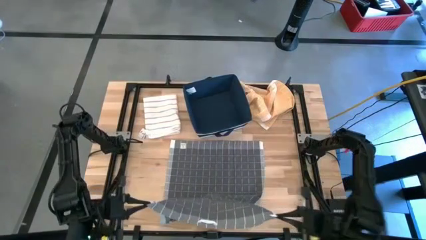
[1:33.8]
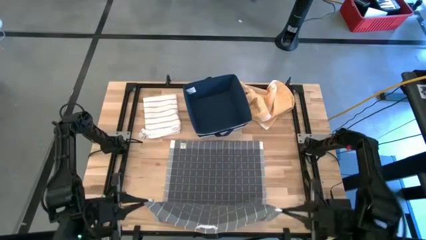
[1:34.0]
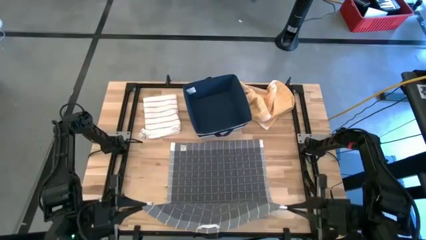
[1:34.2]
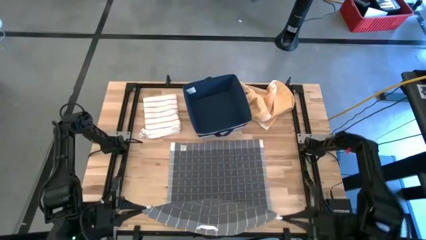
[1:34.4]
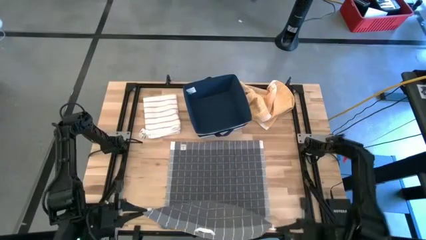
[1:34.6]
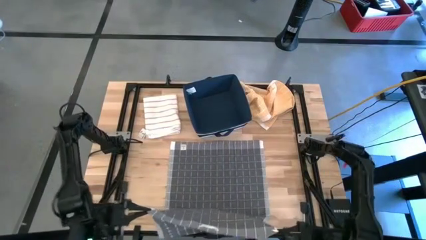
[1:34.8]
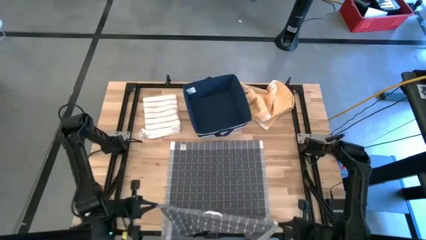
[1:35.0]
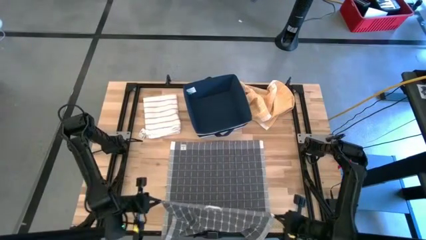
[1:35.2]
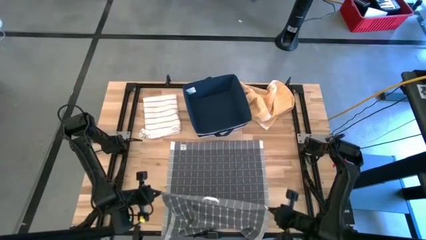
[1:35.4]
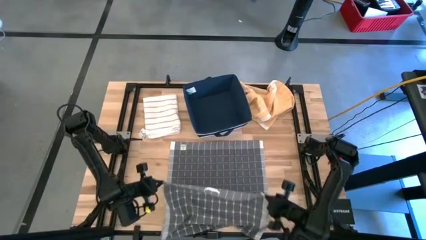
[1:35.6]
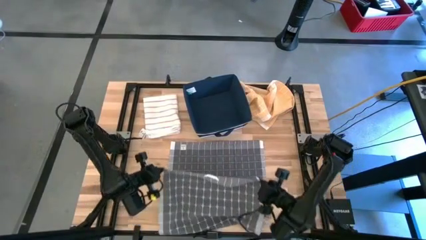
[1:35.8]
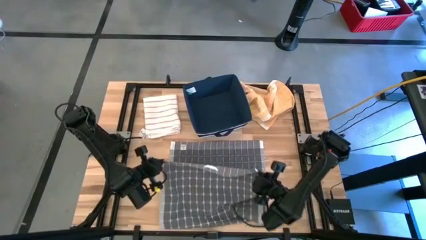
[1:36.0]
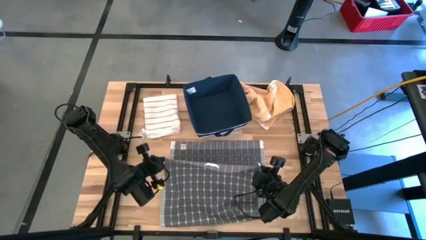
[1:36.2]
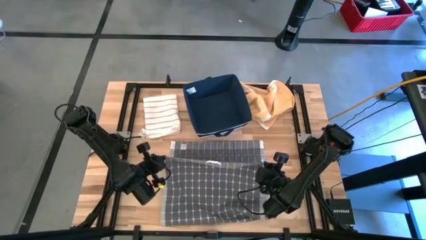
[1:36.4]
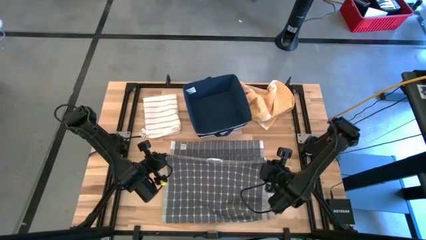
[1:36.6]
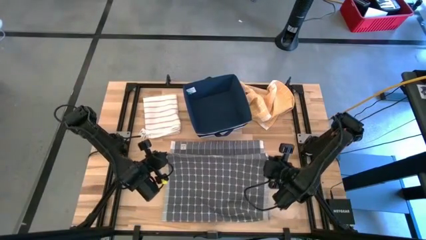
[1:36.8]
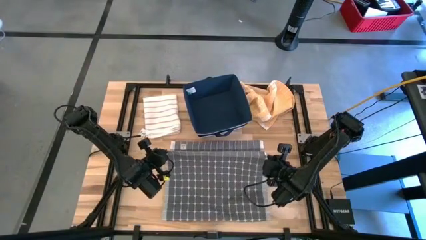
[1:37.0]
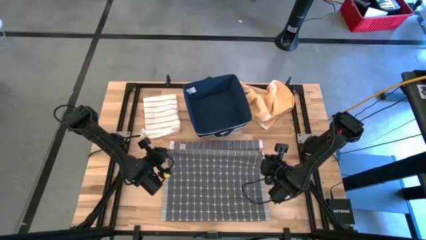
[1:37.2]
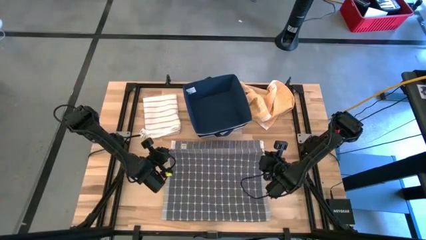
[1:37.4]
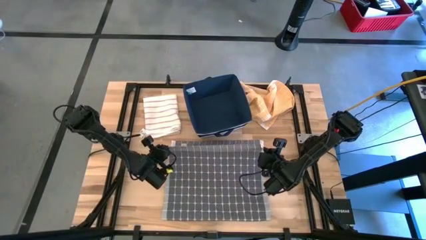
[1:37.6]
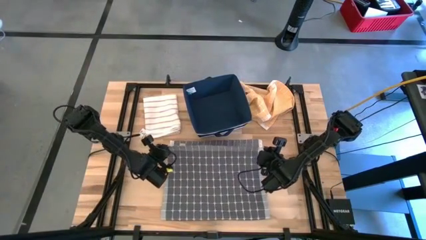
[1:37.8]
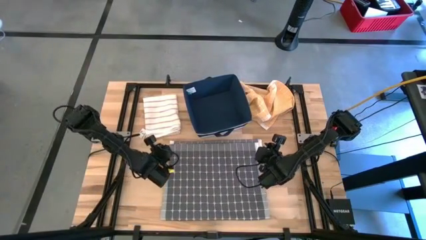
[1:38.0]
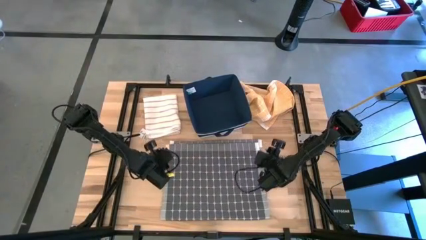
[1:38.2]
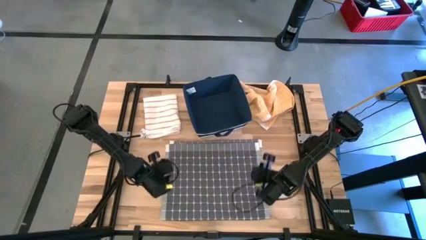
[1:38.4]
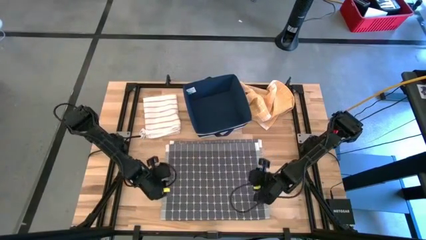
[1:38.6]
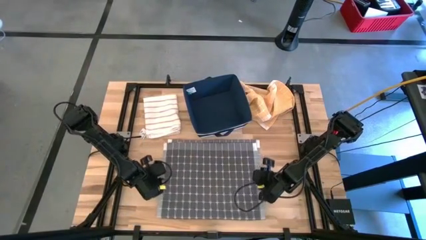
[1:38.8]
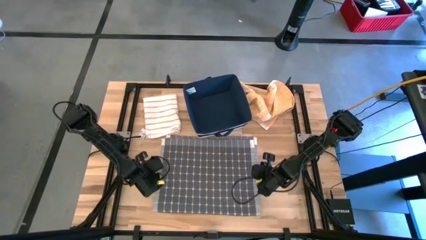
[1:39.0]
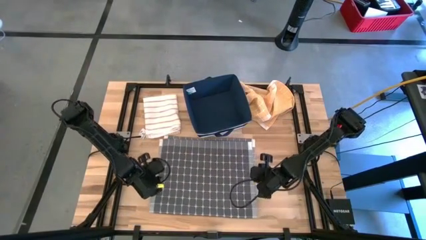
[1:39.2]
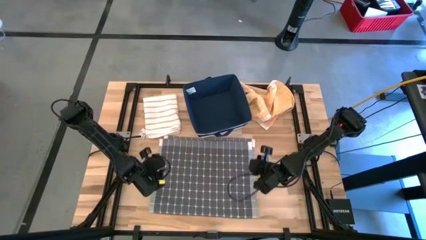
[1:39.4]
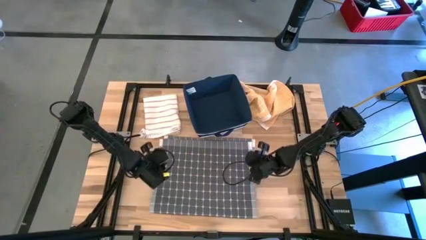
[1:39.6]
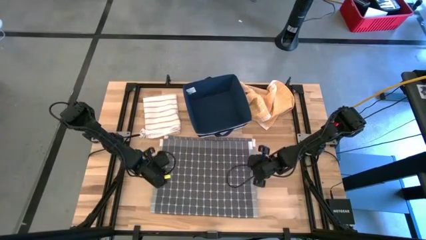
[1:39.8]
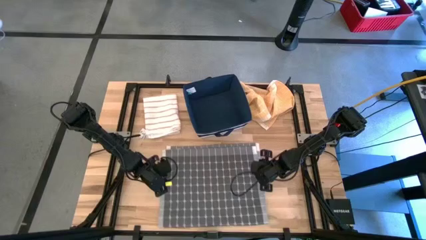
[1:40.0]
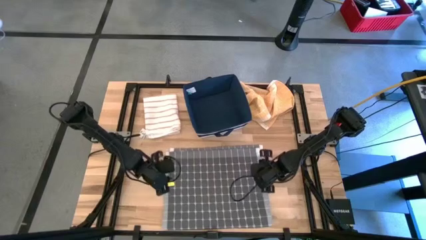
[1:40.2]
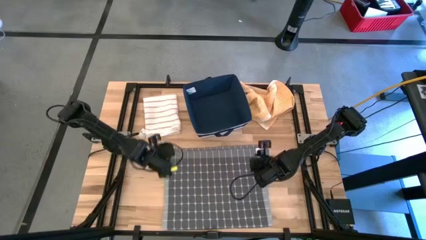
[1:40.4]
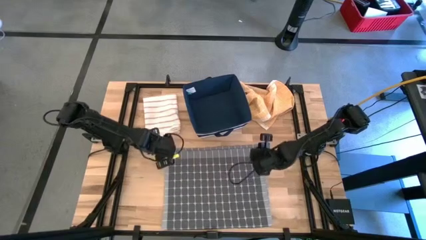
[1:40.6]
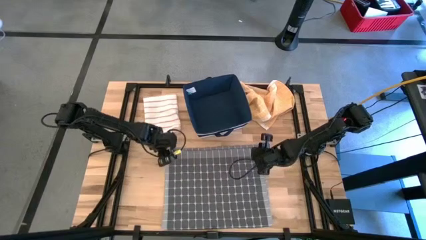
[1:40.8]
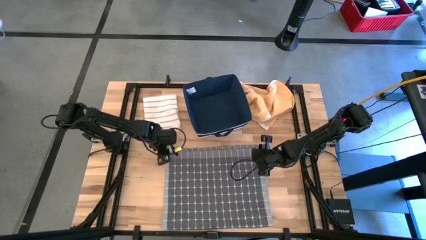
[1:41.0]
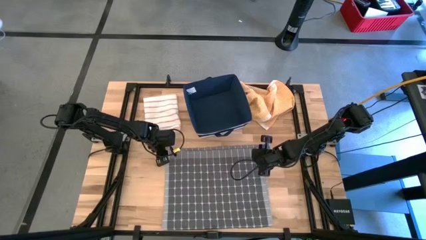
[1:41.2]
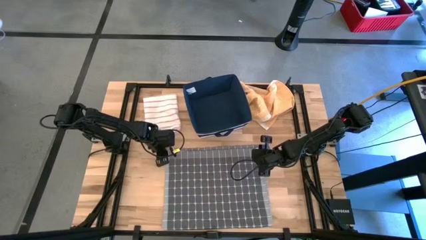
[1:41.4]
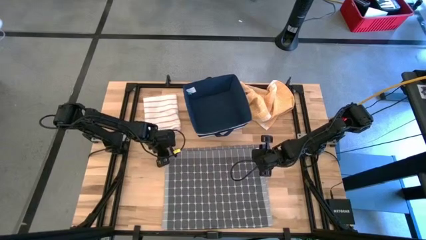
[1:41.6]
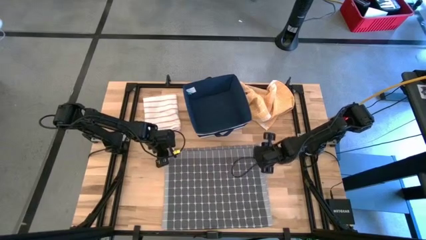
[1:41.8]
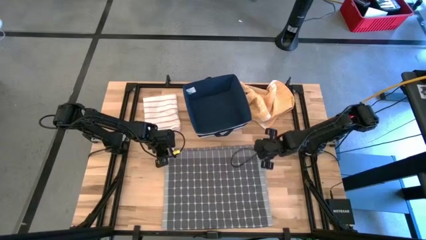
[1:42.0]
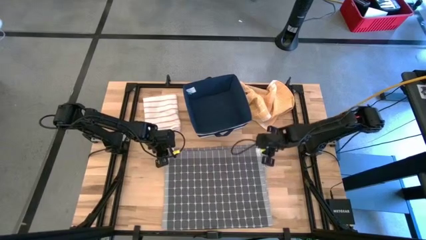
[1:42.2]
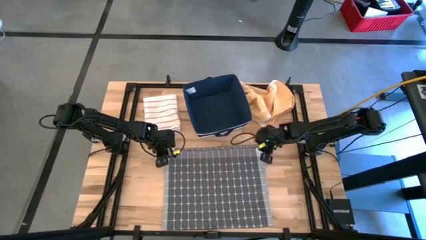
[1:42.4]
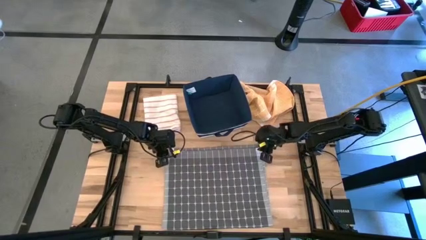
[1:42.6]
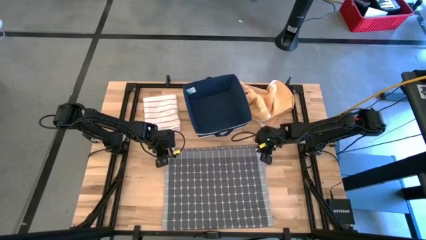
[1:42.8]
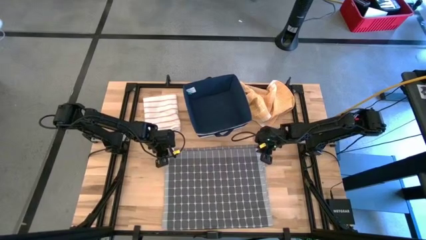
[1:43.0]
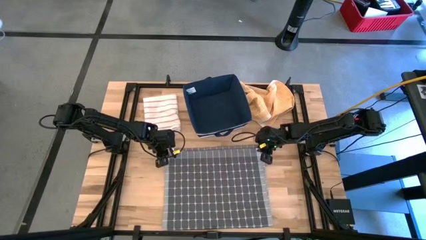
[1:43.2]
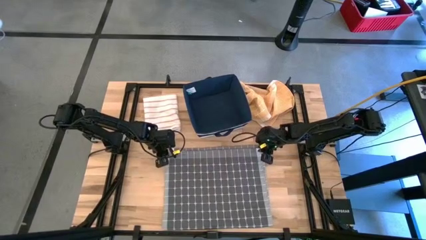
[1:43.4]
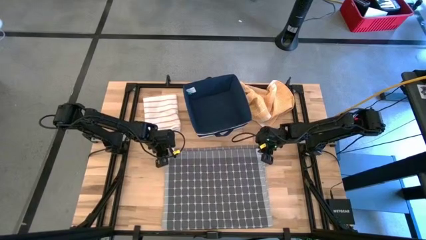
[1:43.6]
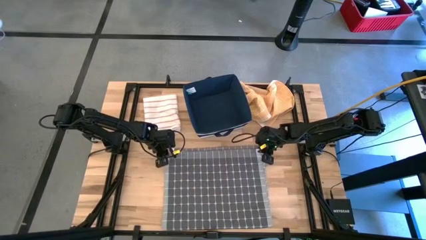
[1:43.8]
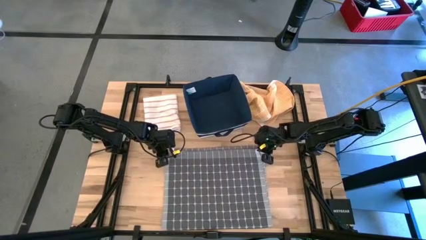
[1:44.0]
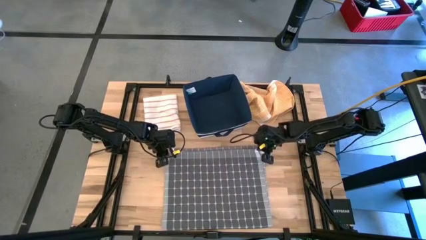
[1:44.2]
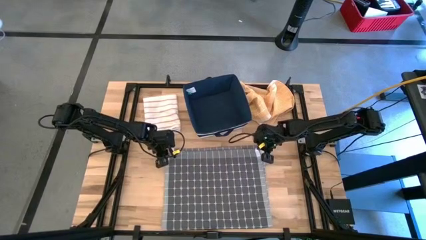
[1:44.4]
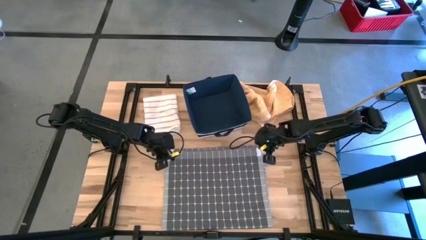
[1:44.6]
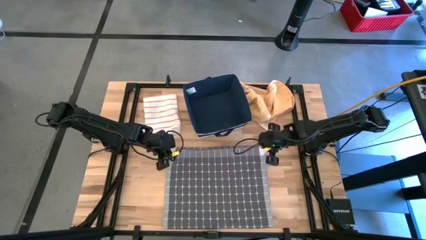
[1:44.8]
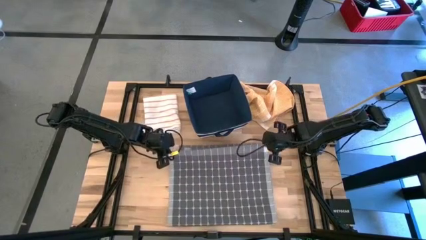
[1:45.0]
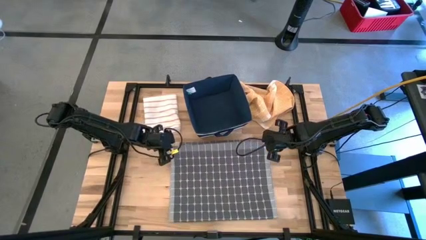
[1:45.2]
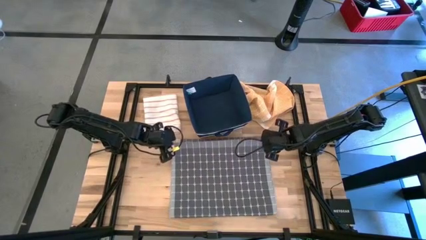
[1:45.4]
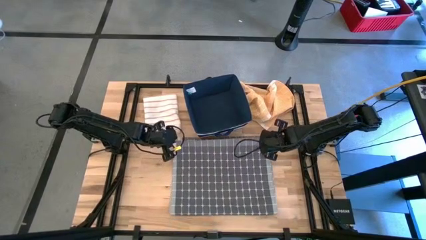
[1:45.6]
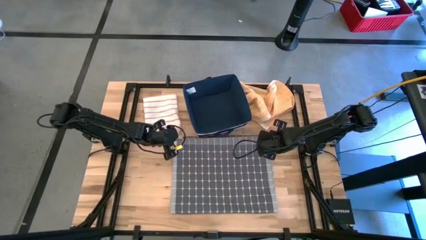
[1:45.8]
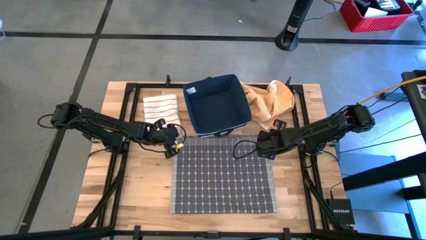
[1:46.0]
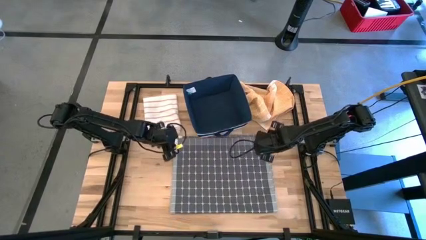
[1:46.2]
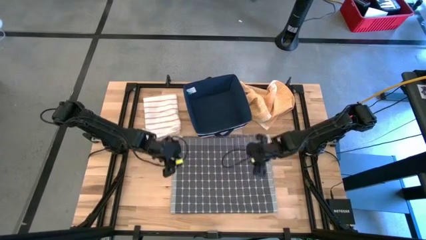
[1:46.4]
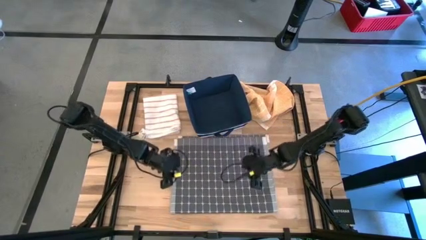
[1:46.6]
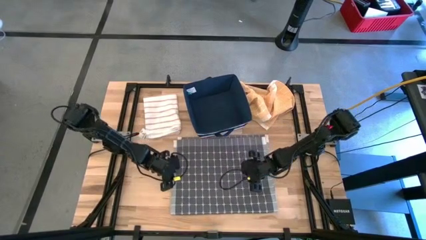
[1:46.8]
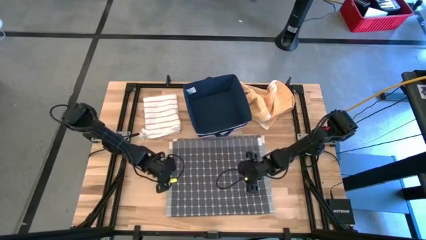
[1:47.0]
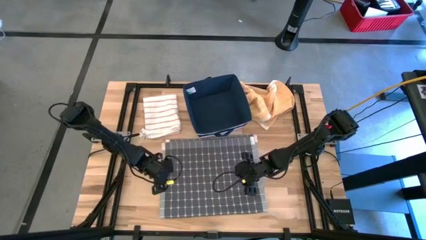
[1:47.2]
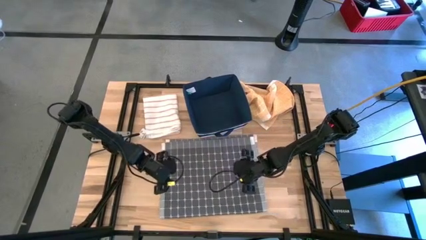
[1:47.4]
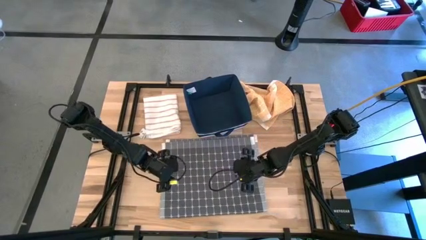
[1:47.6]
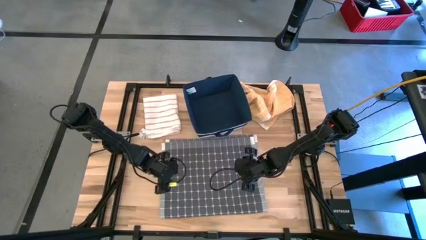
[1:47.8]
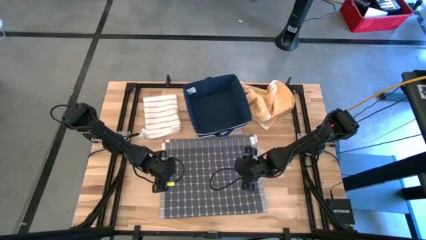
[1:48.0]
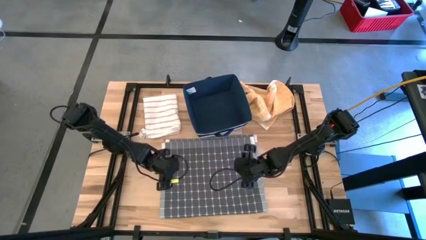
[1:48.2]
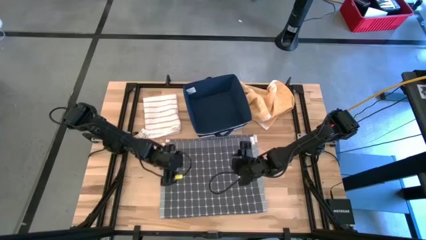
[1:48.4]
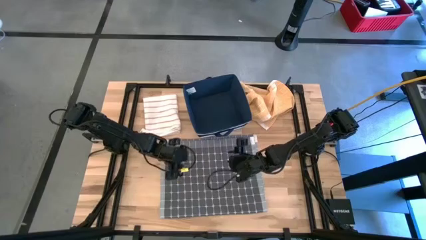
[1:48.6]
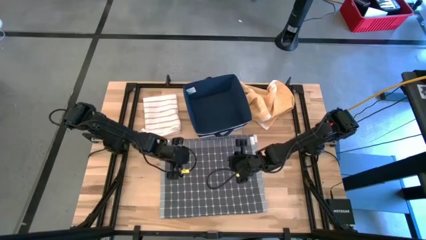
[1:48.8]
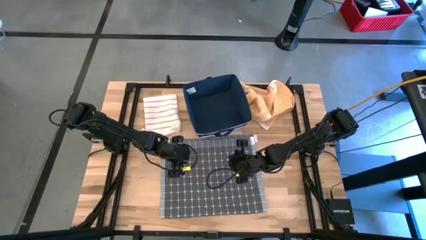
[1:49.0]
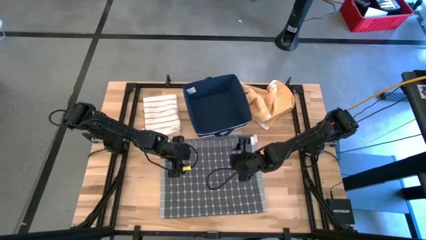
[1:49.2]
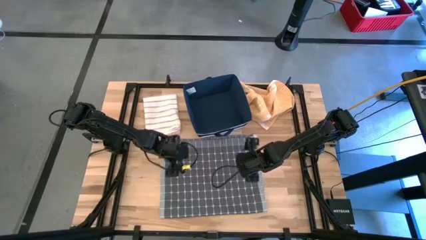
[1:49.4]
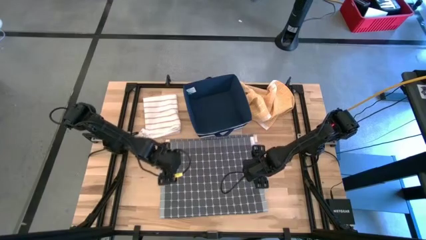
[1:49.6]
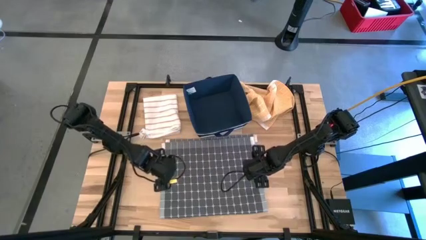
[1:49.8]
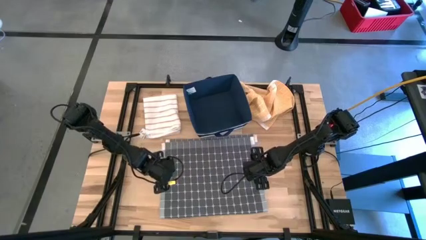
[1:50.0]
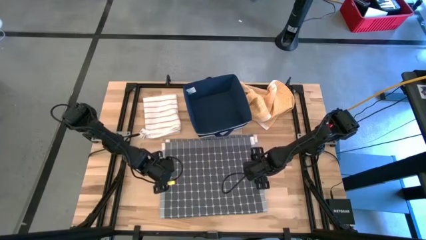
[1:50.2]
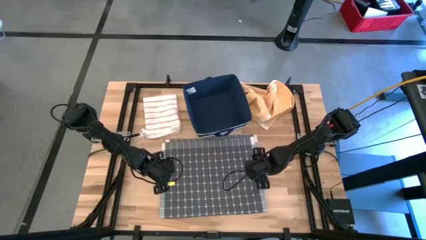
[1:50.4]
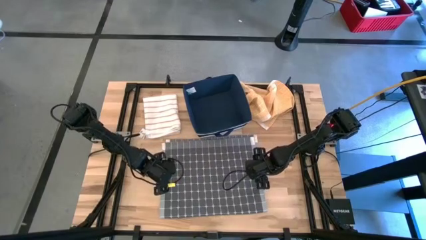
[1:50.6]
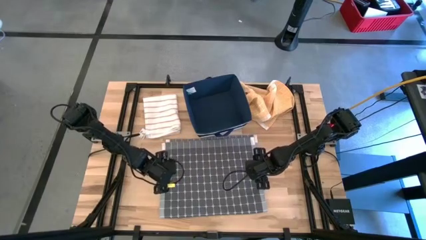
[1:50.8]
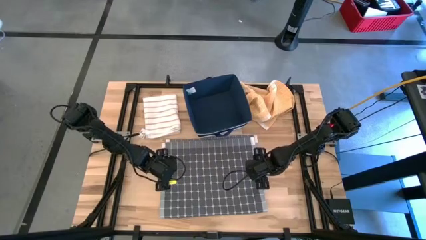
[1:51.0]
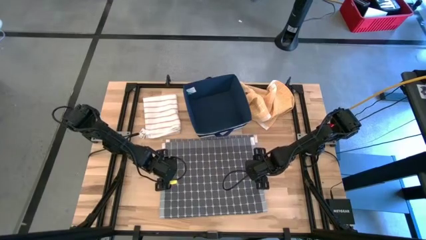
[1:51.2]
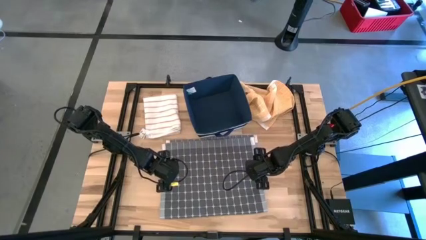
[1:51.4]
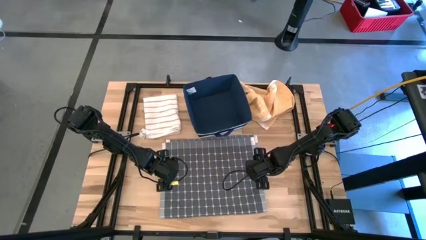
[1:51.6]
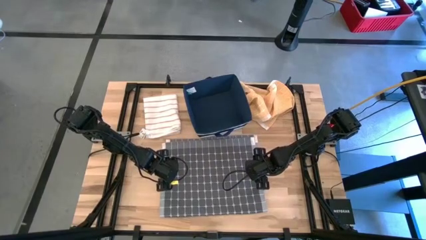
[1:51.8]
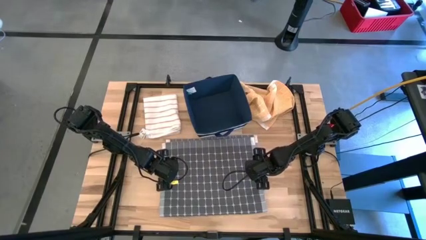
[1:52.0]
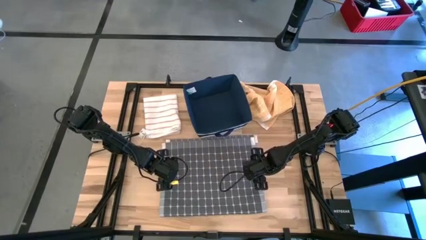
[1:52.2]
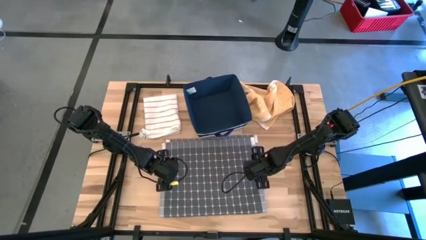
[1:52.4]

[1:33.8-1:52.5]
Task: Fold towel
Fold the black towel
